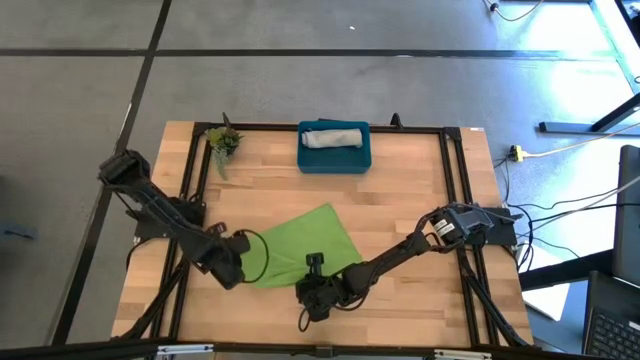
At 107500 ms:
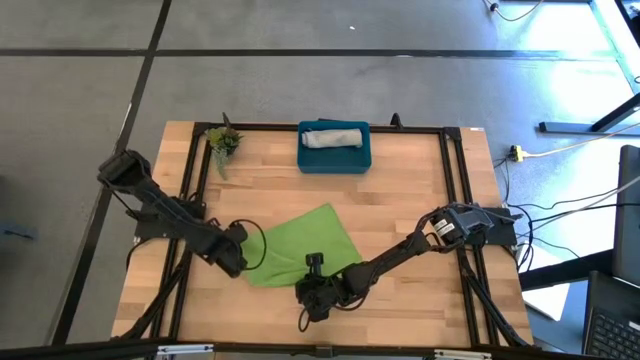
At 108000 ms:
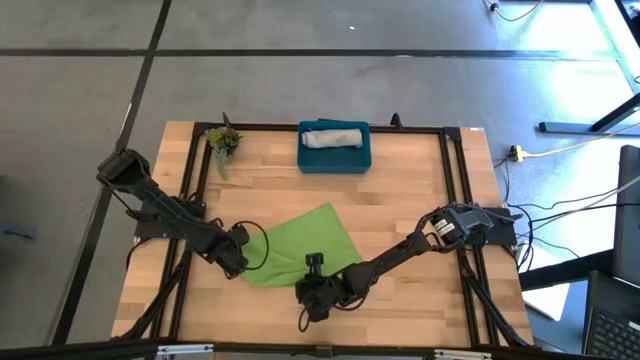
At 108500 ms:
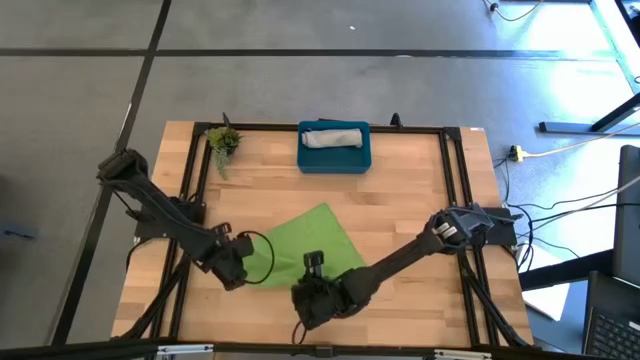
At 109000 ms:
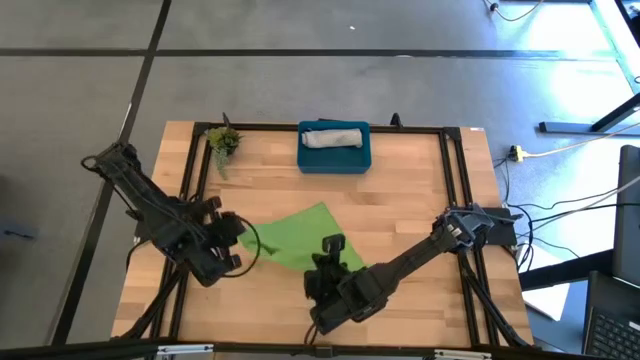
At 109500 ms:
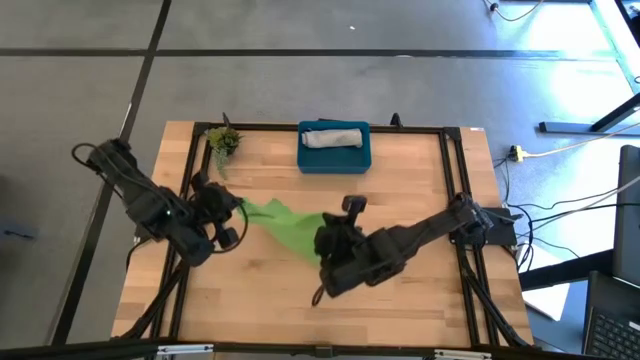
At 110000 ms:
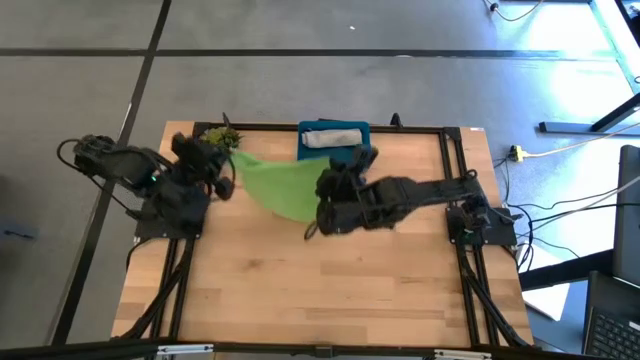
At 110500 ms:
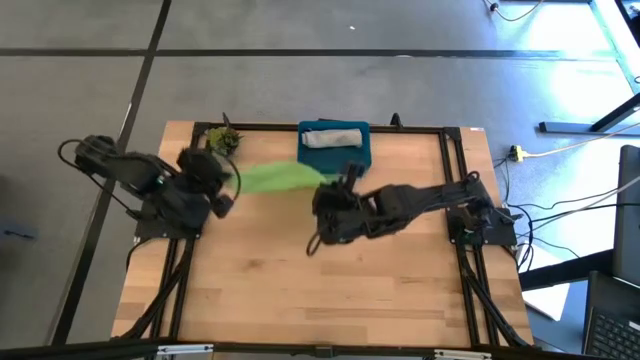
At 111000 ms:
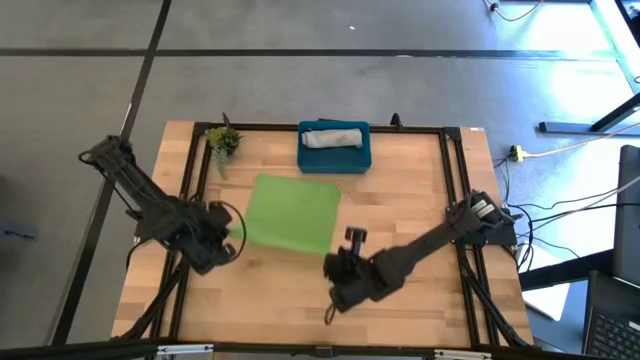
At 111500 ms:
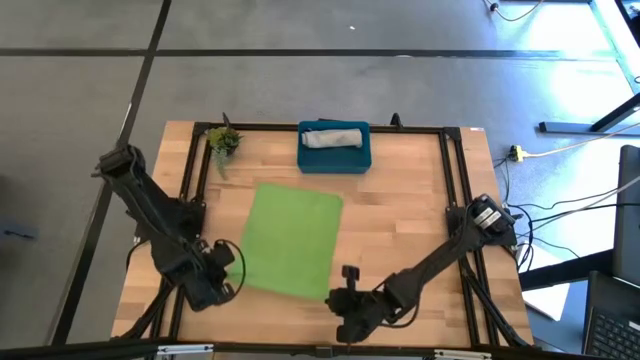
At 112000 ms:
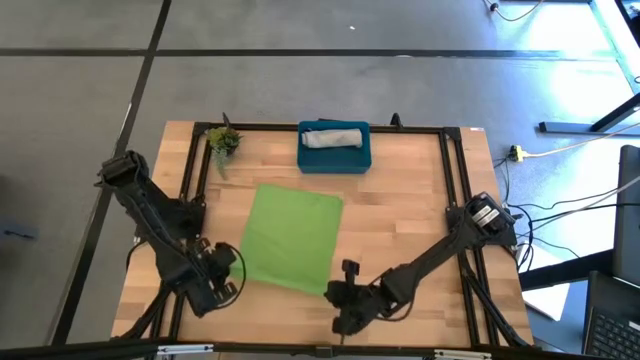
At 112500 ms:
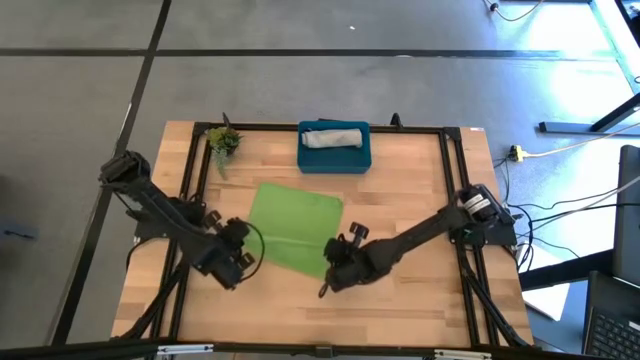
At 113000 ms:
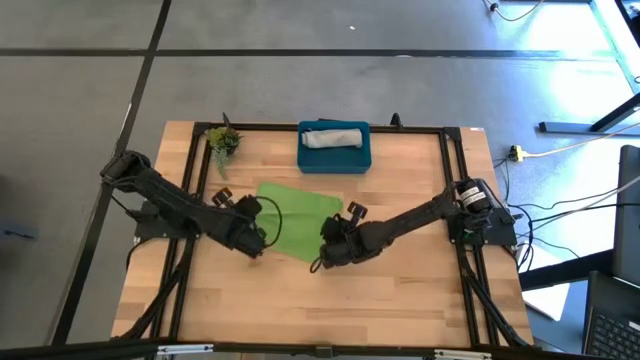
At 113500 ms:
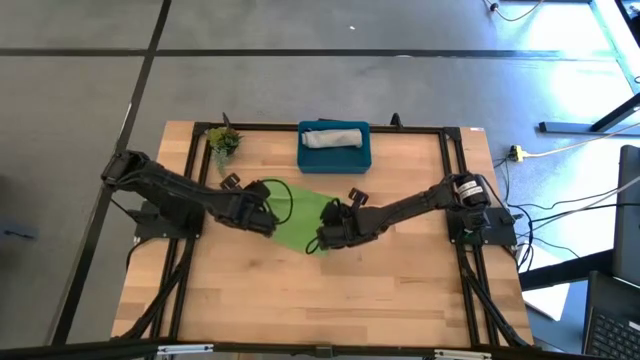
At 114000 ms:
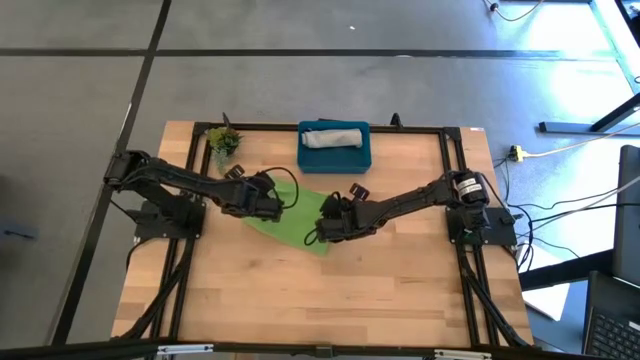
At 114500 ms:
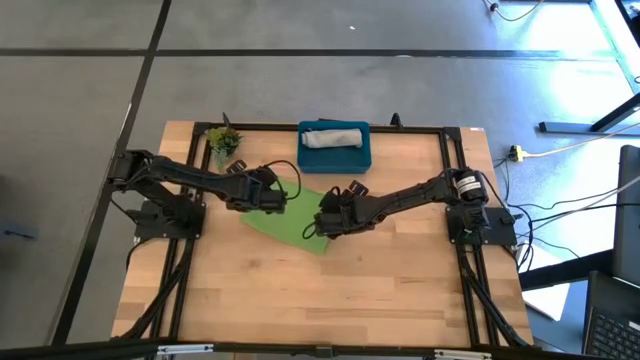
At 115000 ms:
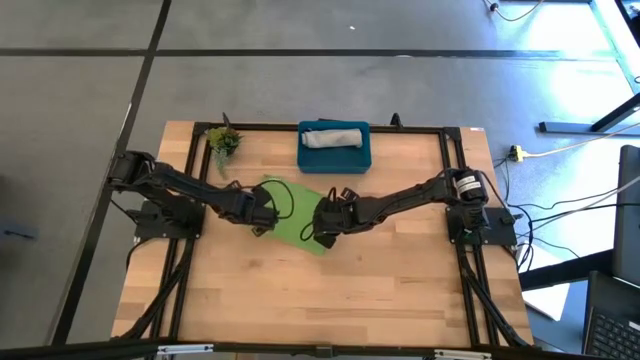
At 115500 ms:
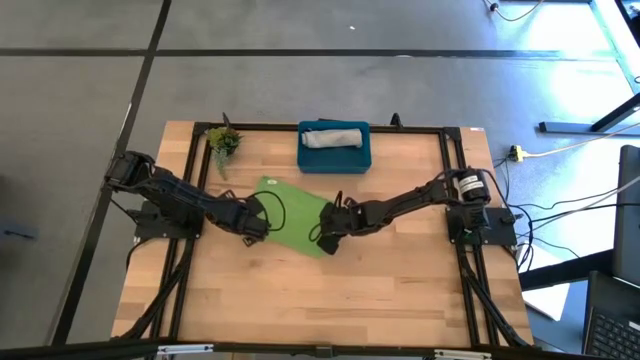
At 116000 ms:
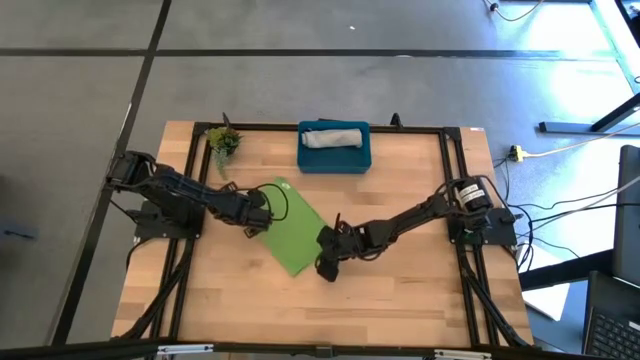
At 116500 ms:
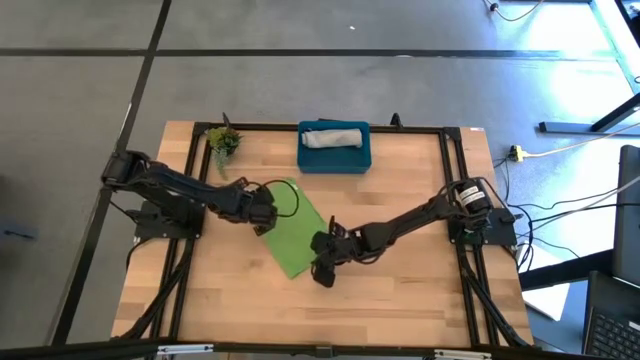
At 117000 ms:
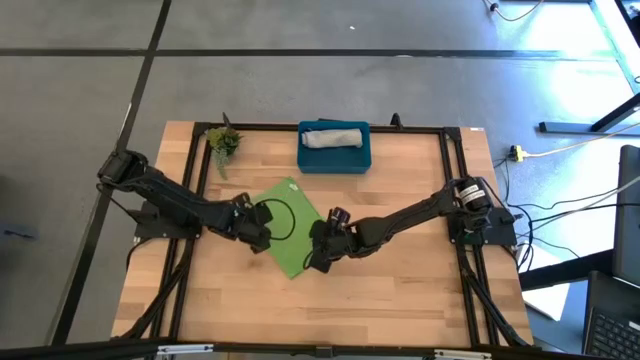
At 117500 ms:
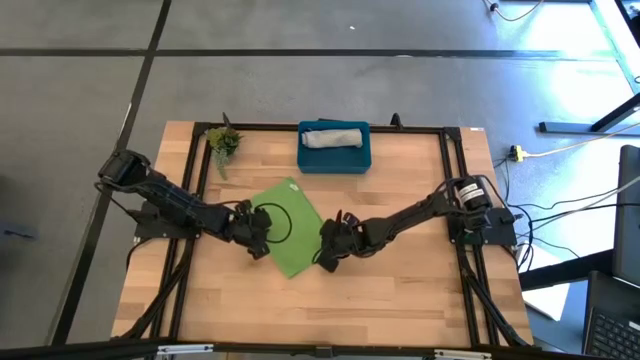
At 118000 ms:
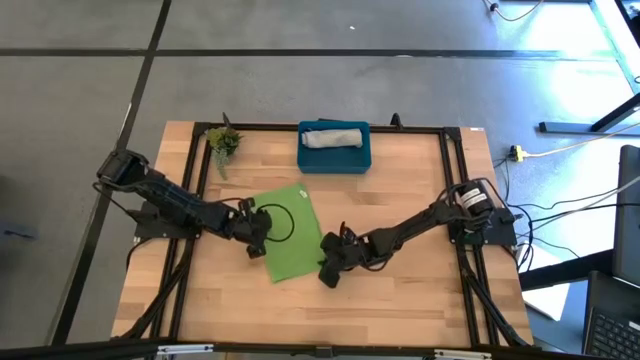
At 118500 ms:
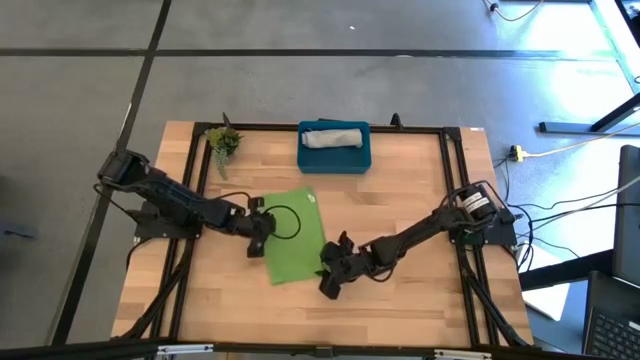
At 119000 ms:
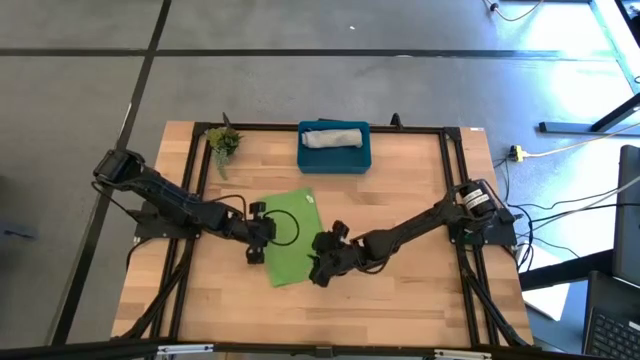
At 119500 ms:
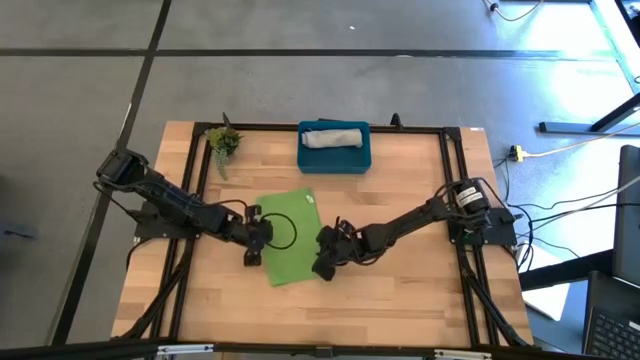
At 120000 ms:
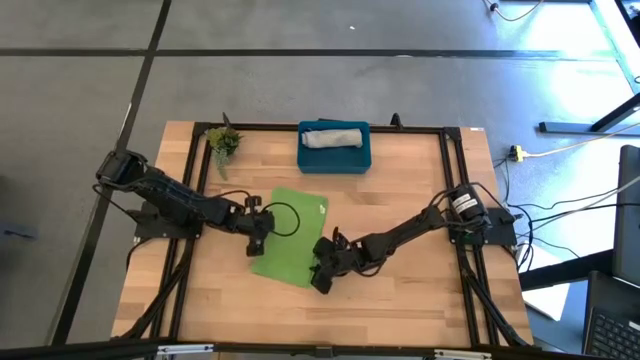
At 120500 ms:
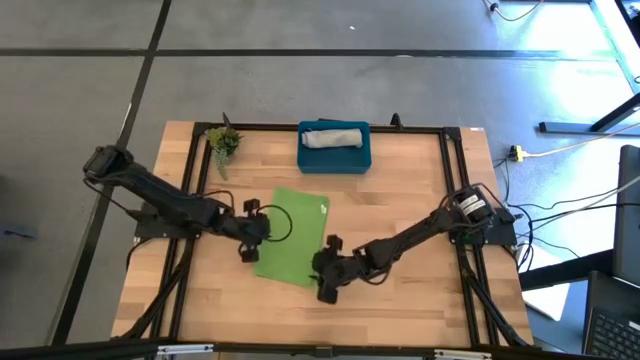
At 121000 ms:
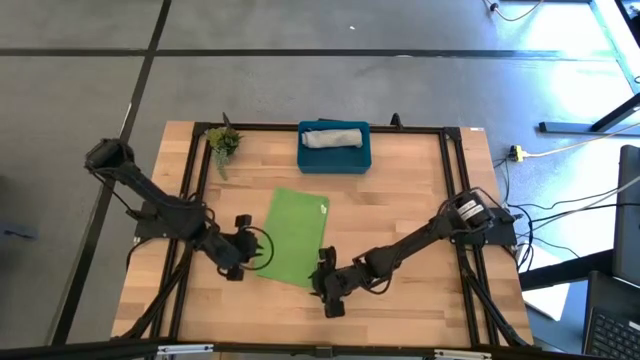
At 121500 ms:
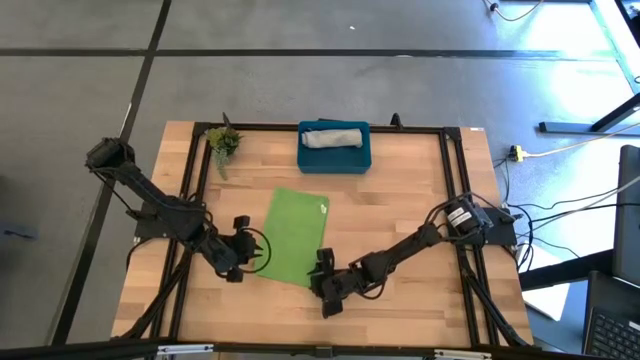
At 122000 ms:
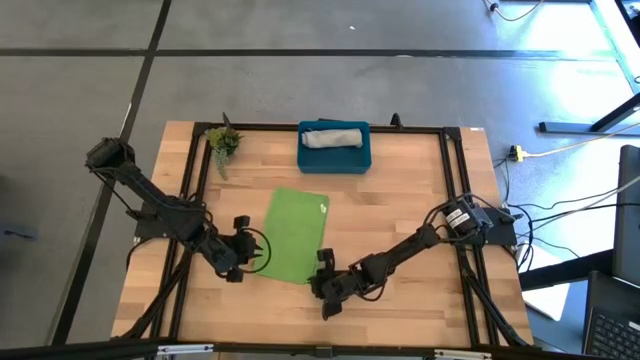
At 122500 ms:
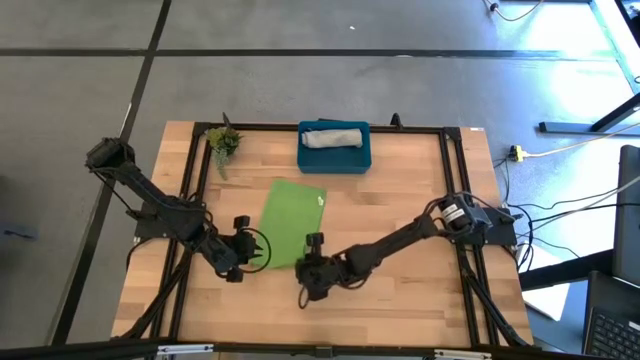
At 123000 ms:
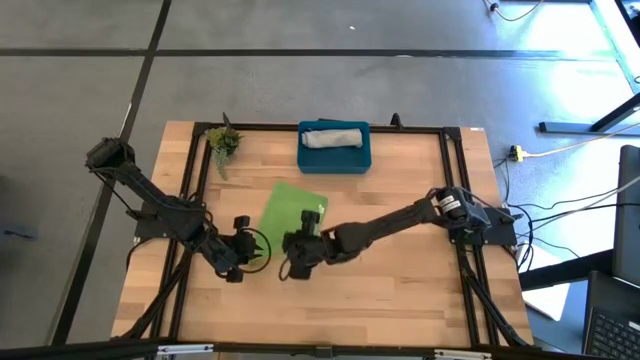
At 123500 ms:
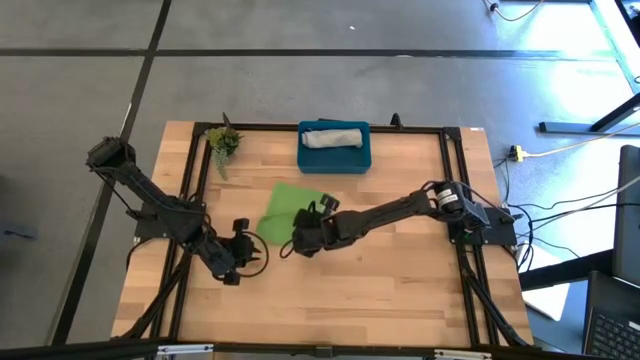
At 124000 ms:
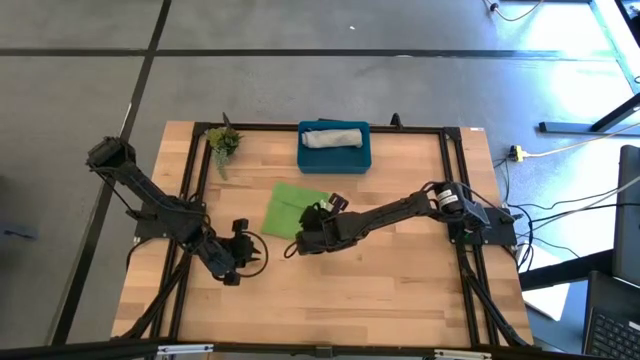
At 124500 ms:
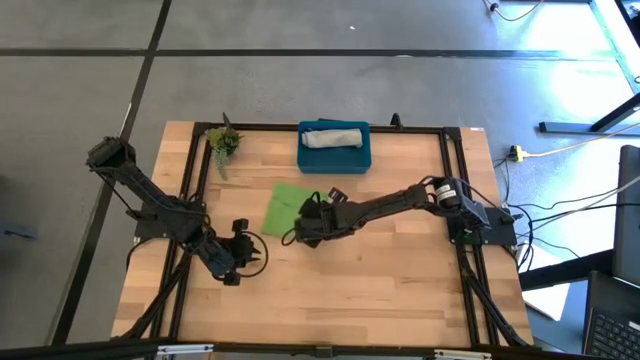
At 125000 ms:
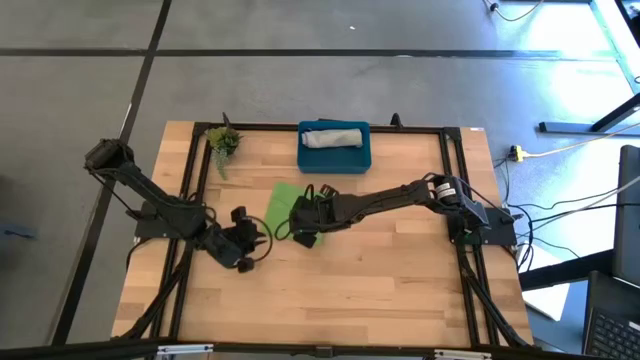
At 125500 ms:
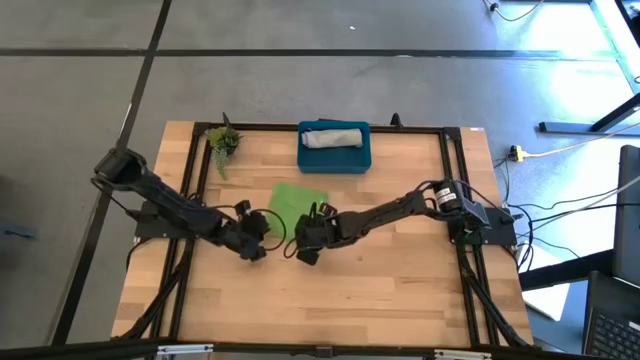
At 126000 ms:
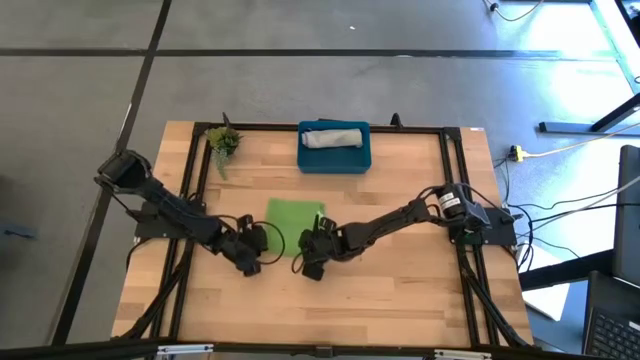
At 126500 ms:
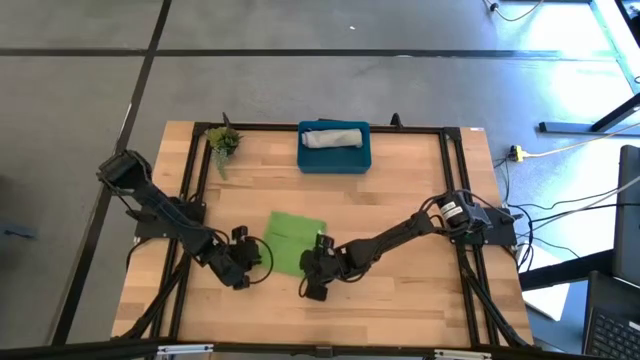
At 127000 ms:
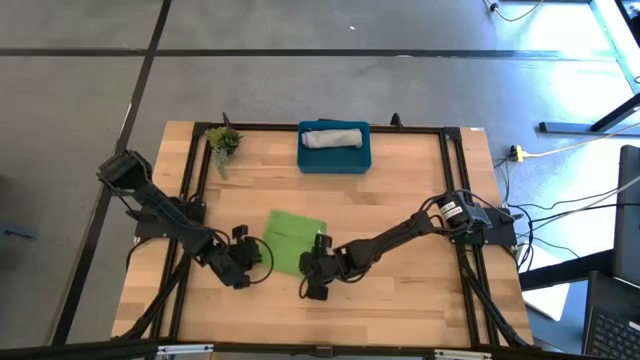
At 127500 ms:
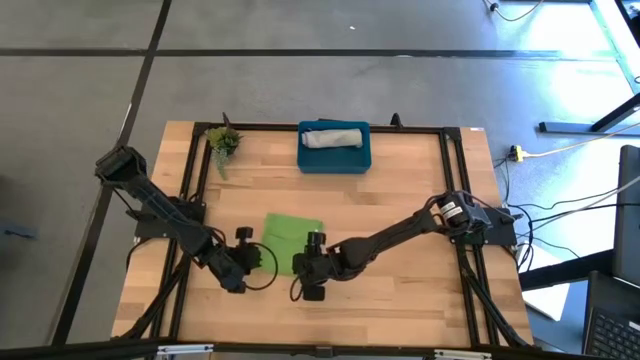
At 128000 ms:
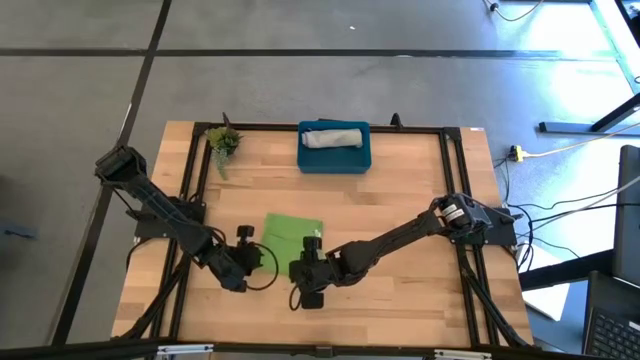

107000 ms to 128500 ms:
Task: Roll microfiber towels into tight, uniform cylinder then place into a basket
Roll the green microfiber cloth

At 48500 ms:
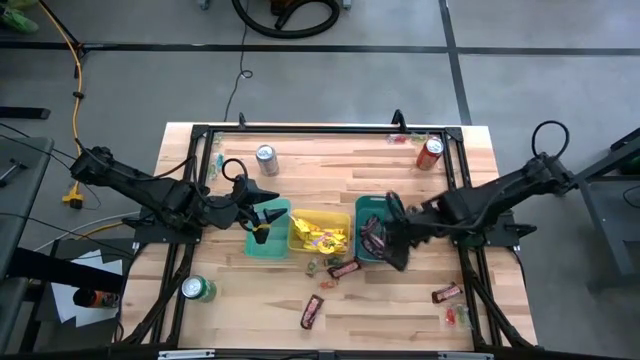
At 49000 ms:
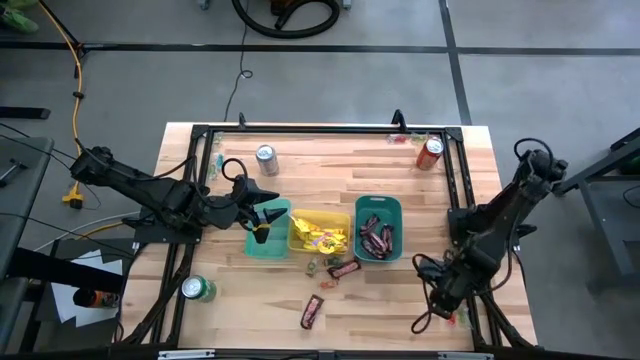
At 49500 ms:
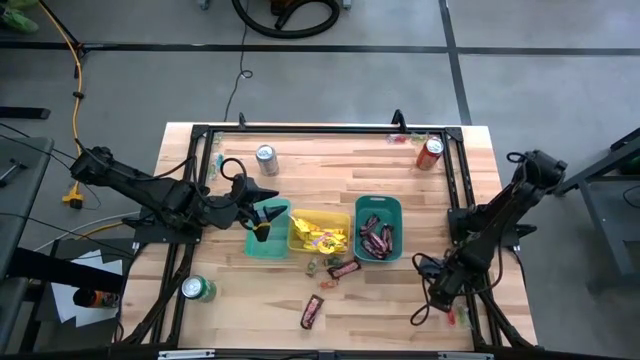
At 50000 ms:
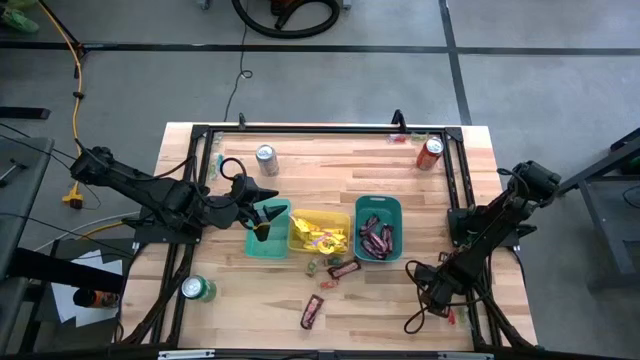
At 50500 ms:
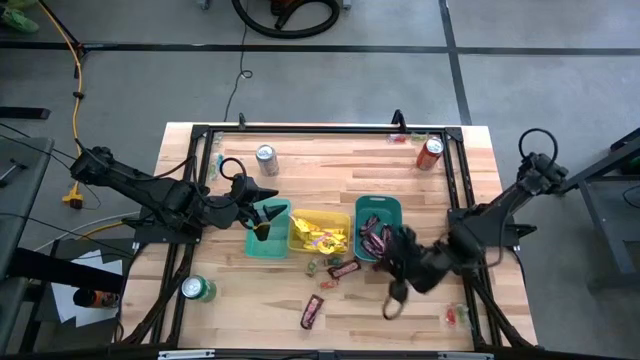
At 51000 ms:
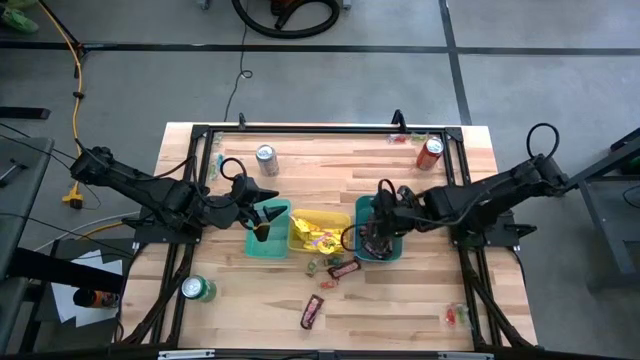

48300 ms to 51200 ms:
Task: Sort candy
Put the brown chocolate bar into the blue bin
